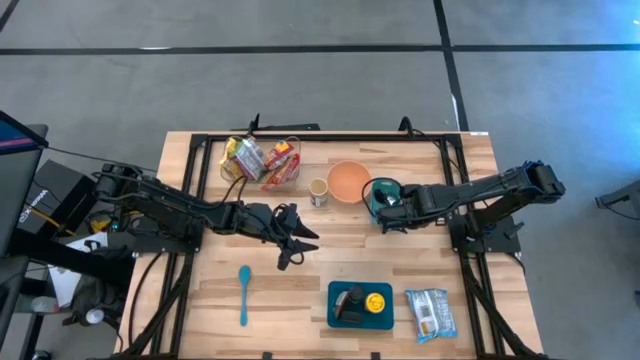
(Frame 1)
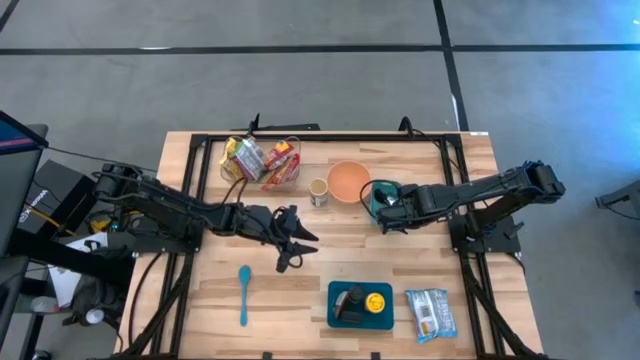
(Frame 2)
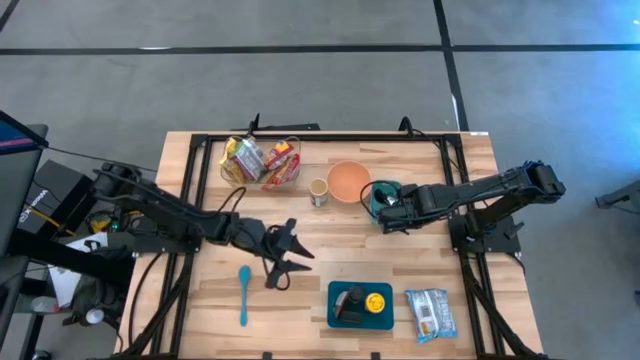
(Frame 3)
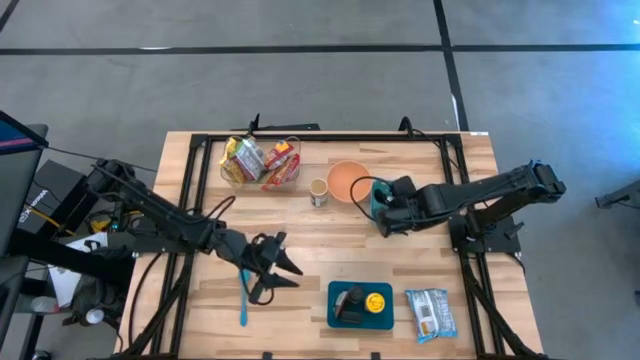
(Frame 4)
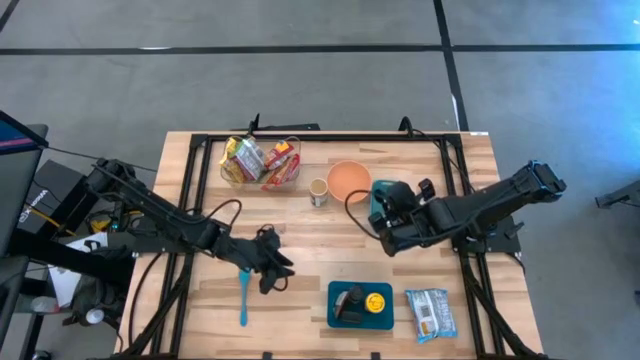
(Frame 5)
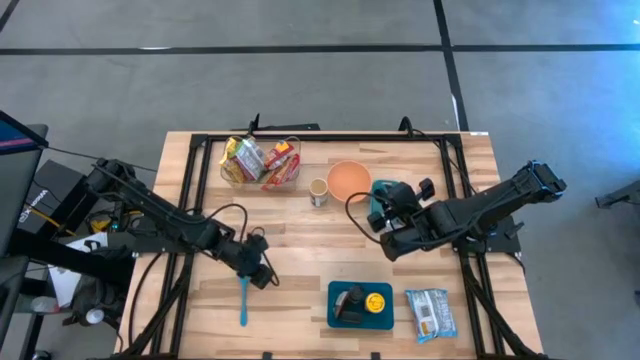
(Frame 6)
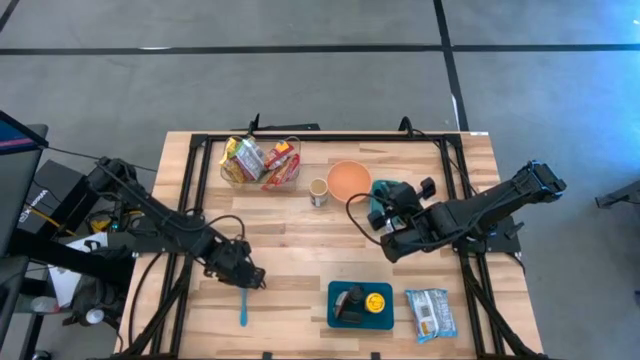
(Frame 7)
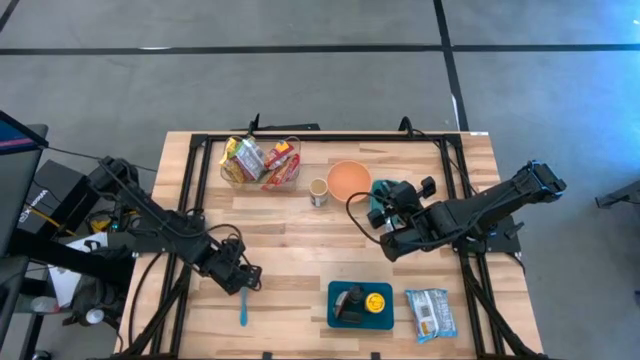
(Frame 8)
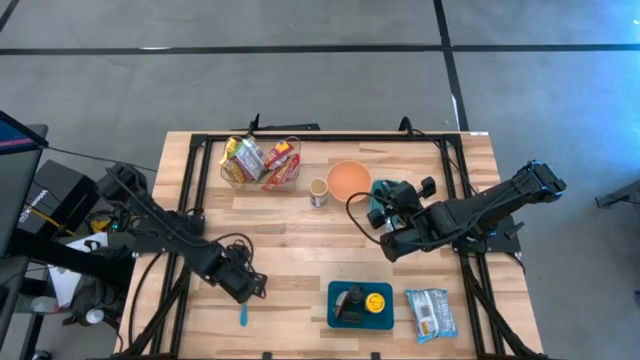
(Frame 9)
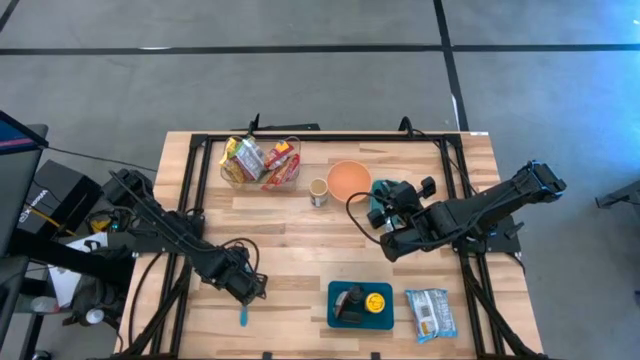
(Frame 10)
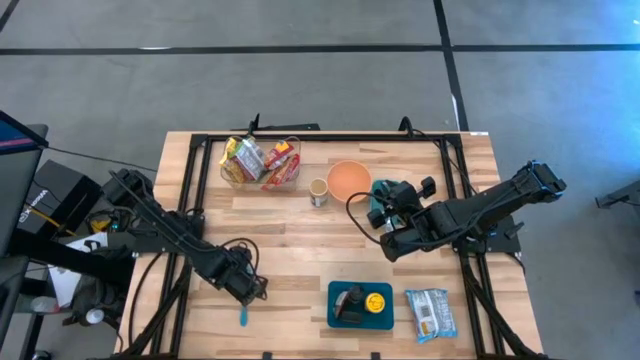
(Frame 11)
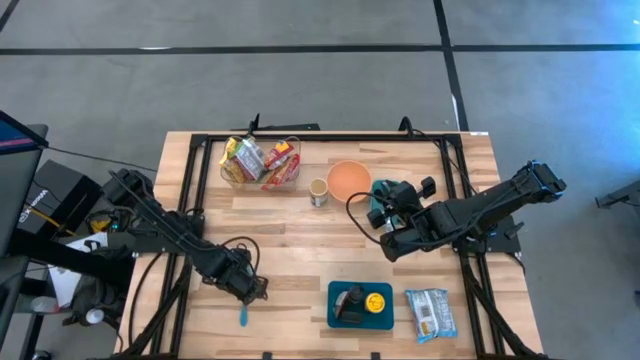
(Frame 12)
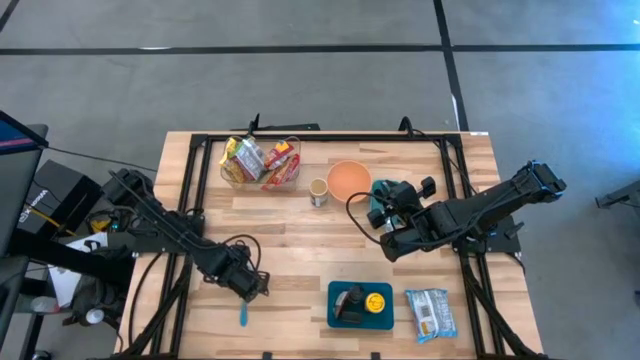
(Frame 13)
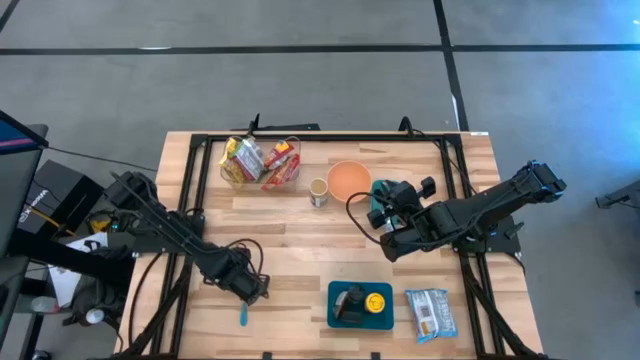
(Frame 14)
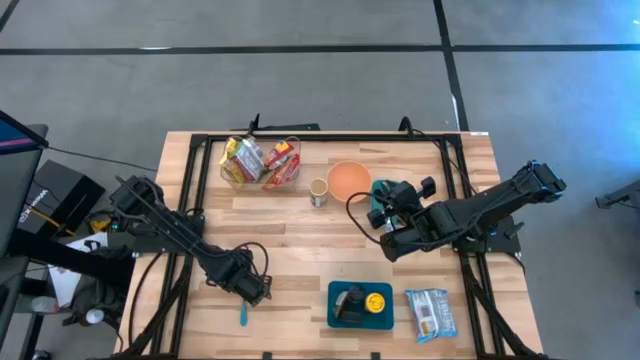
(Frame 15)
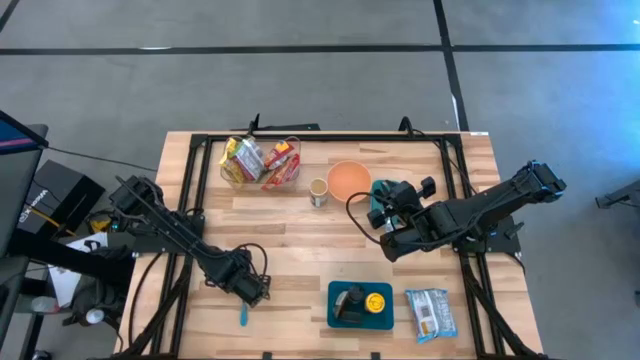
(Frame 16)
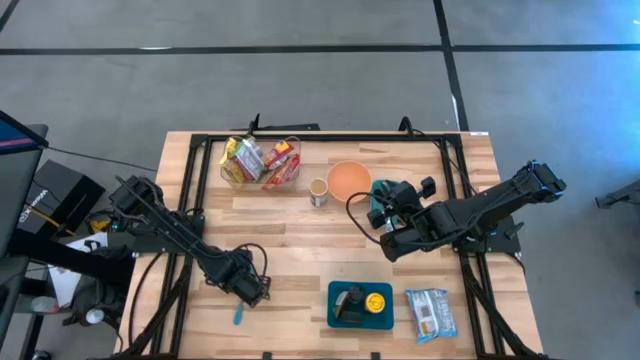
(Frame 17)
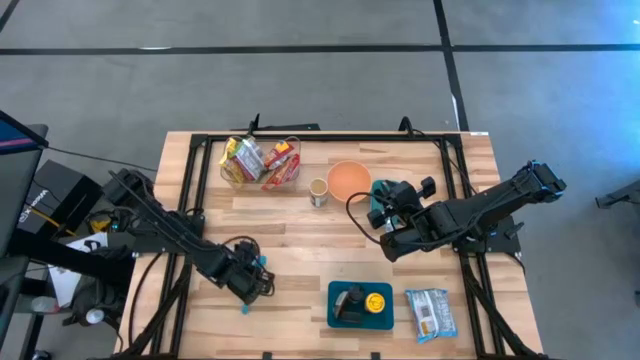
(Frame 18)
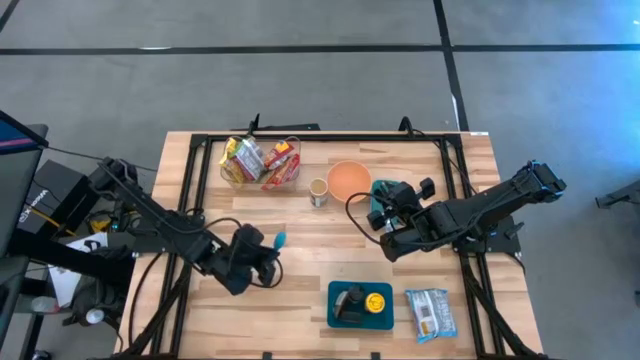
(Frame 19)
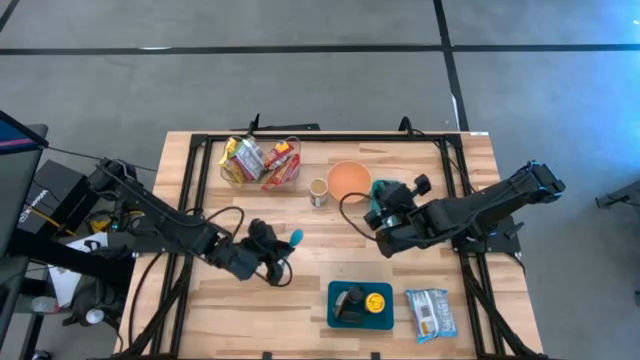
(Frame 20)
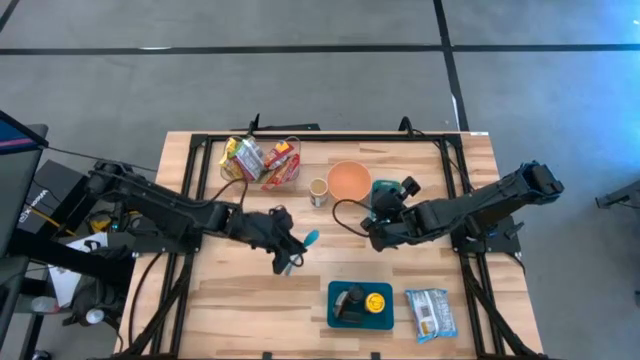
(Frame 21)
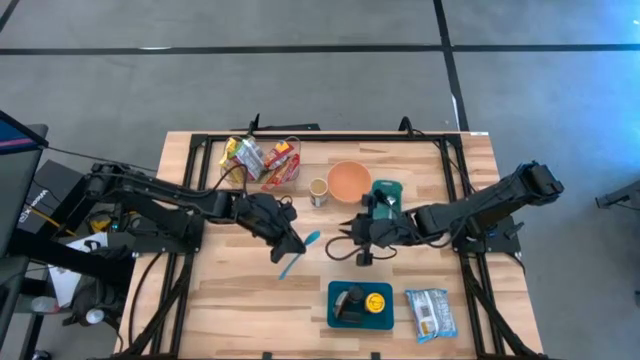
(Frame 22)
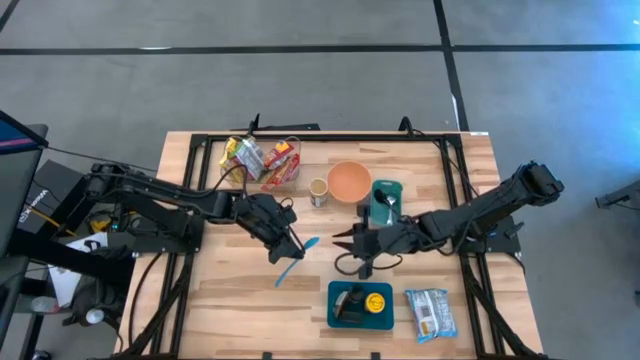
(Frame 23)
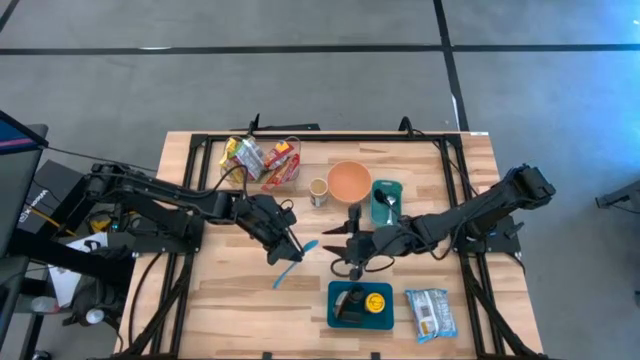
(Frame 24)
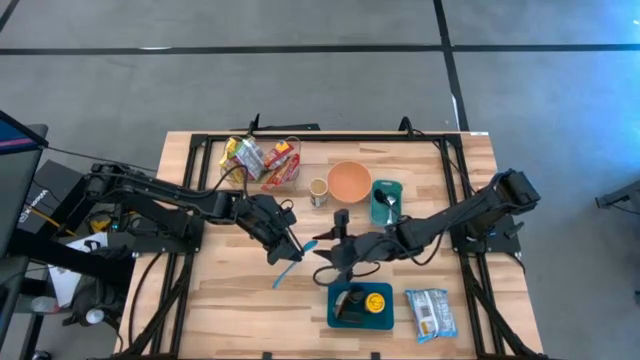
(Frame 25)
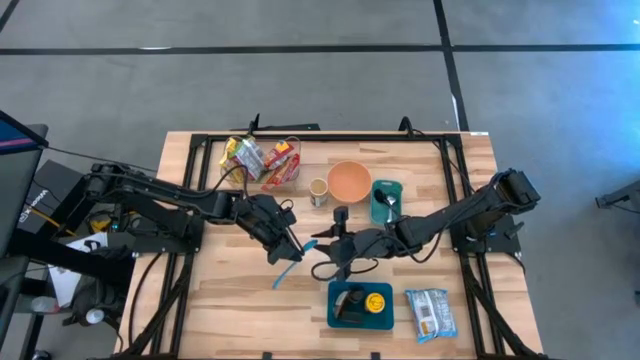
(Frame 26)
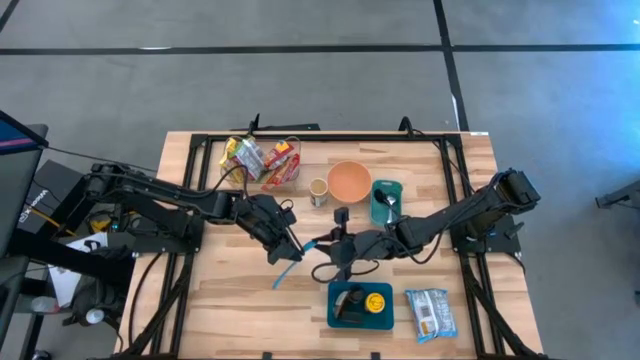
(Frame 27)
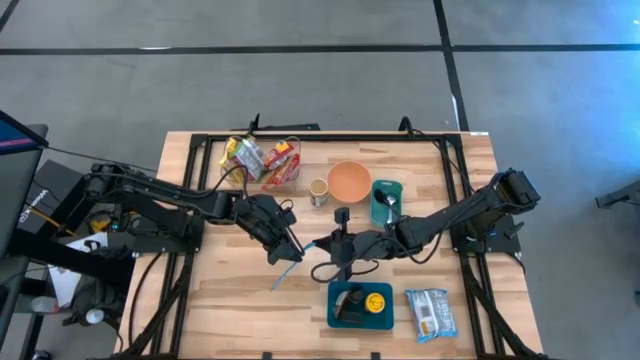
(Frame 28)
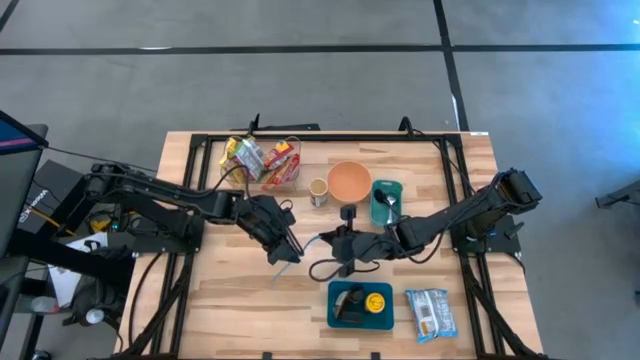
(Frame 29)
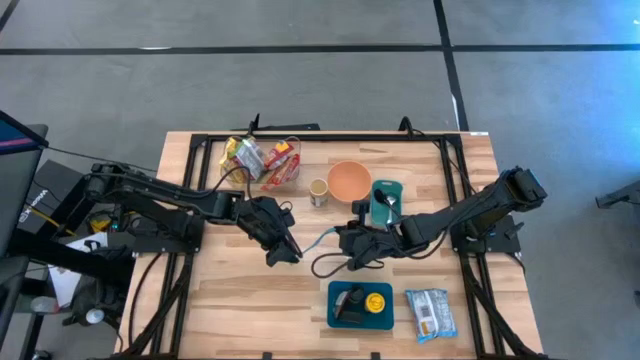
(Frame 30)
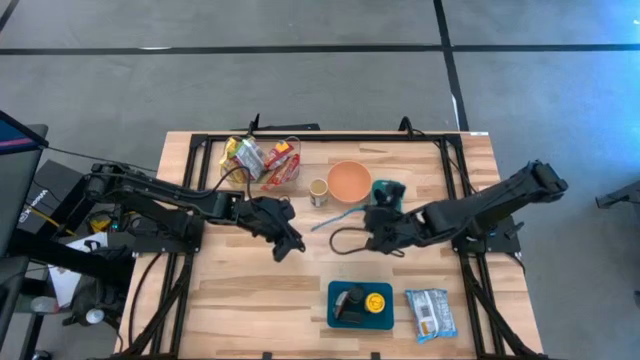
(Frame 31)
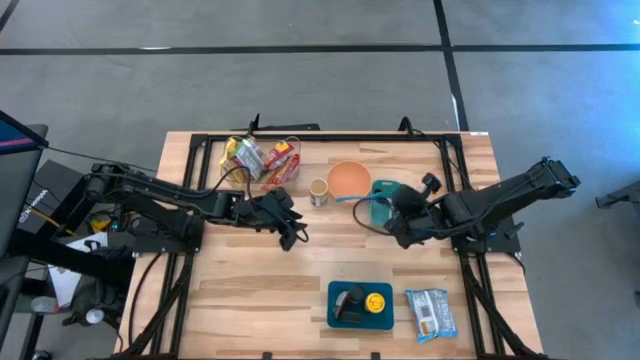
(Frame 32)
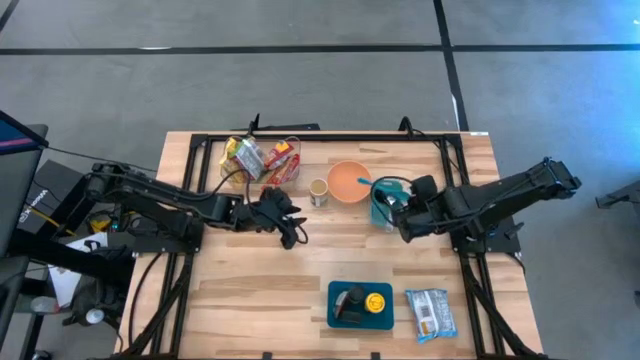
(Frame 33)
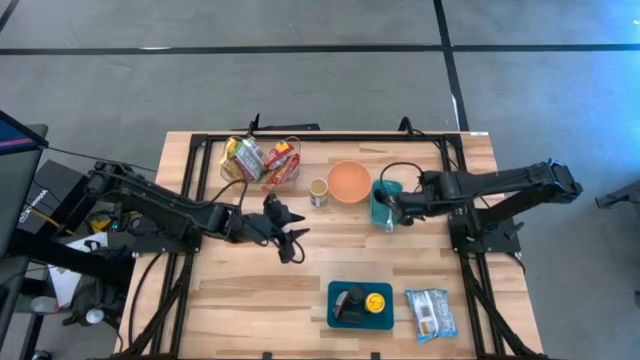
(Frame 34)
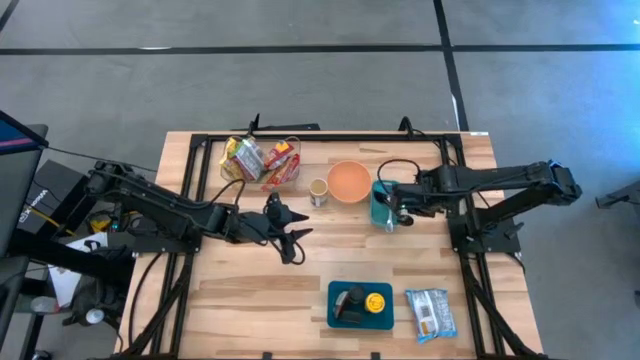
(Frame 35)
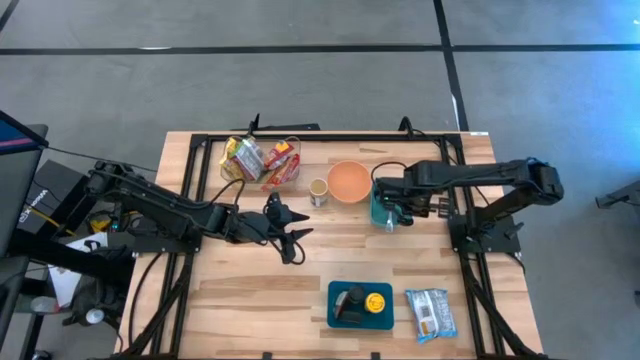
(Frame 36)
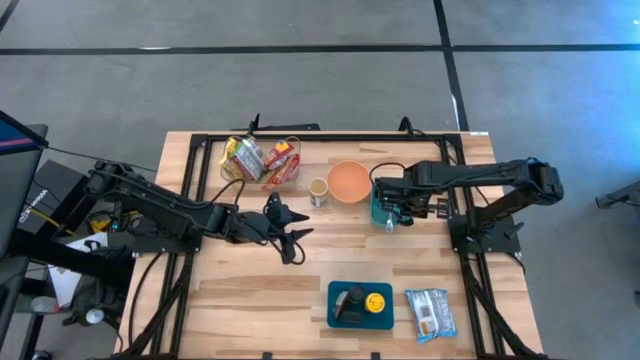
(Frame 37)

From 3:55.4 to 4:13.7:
Task: Pick & Place Food Item
Put the blue baby spoon into the green bin

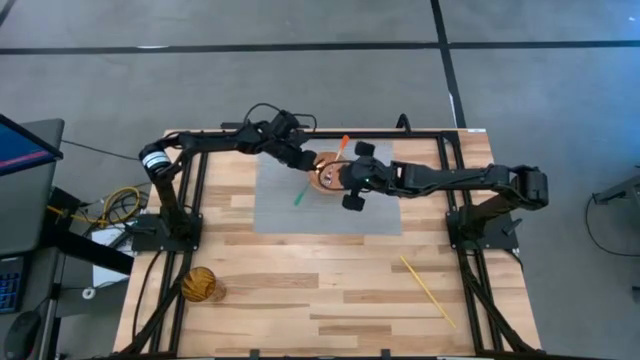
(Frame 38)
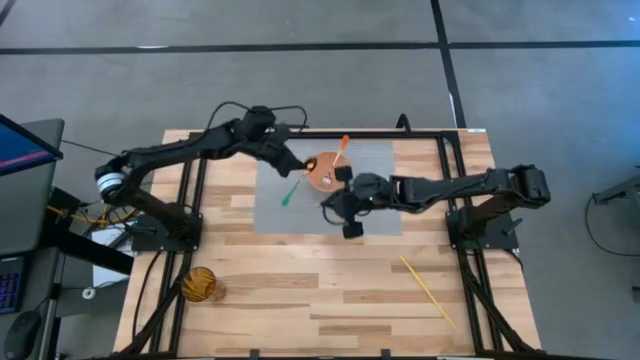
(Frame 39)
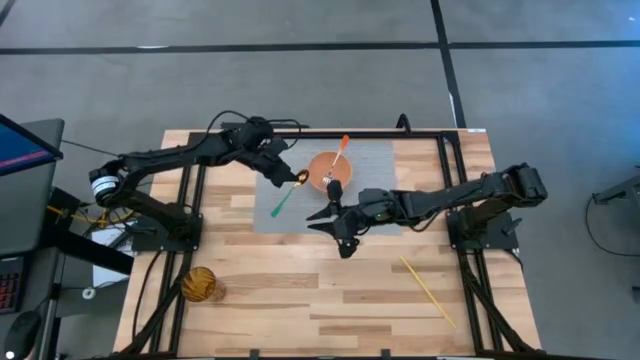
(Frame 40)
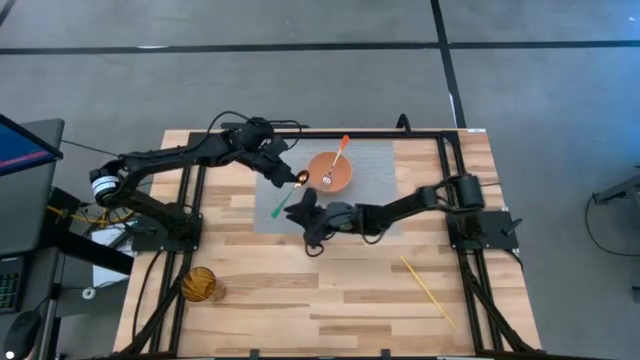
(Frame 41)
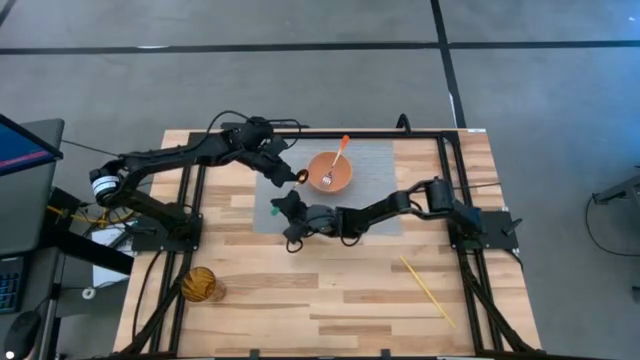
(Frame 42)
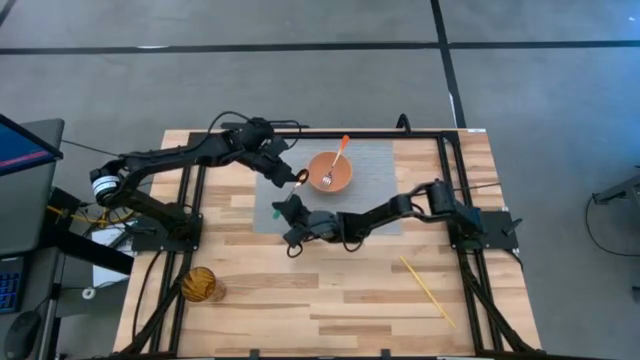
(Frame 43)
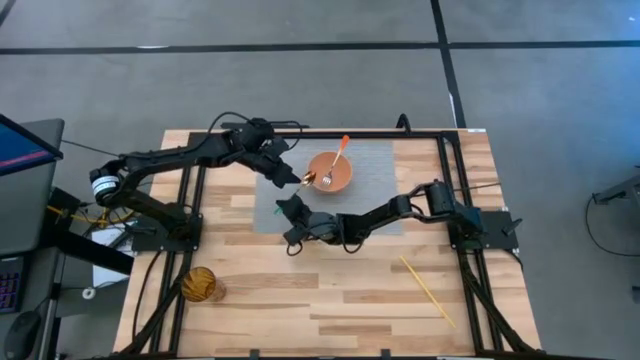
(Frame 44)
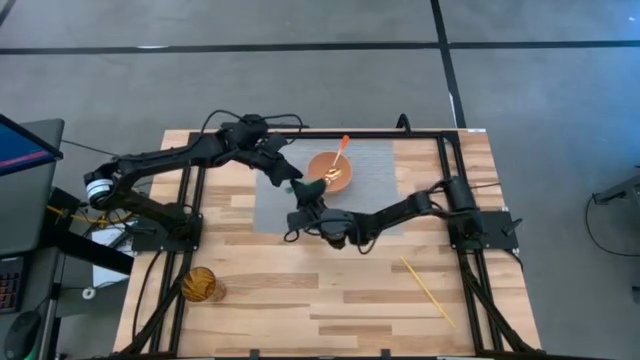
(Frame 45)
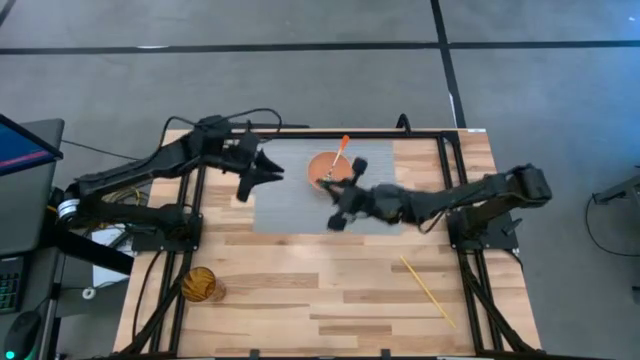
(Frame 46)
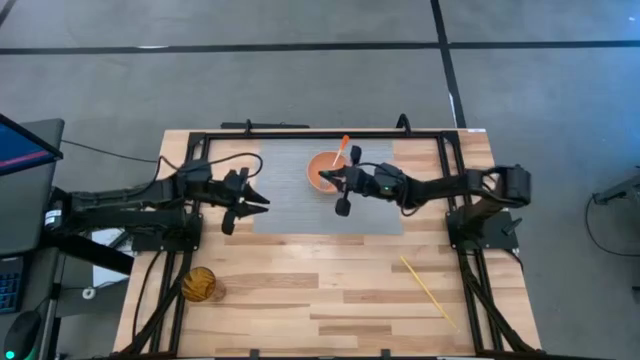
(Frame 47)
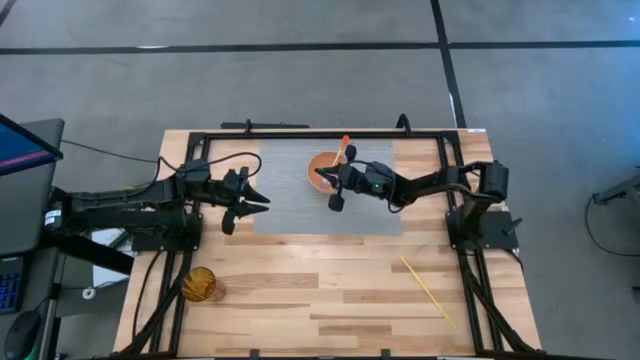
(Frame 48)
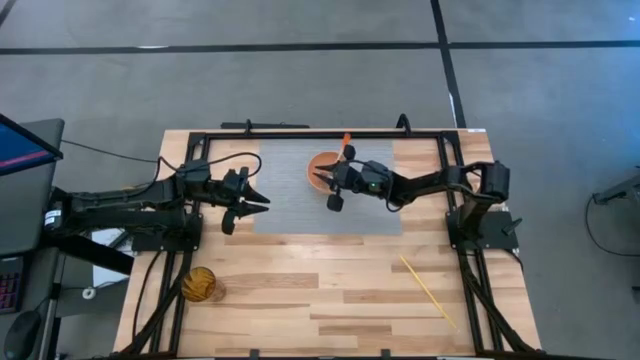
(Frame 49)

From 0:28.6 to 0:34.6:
Task: Pick & Place Utensil
Put the green spoon into the brown bowl
